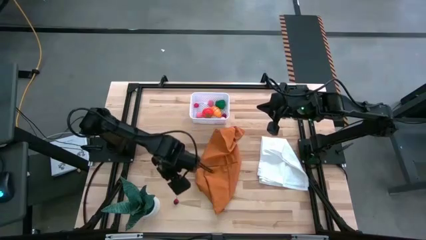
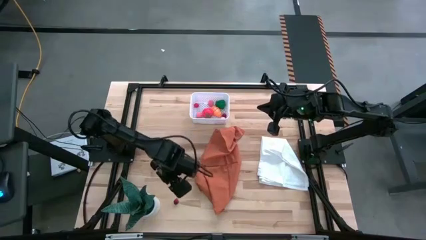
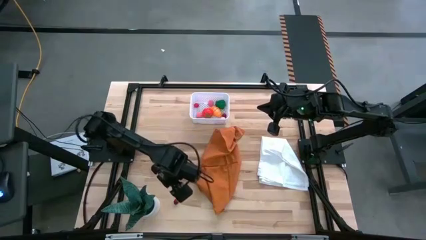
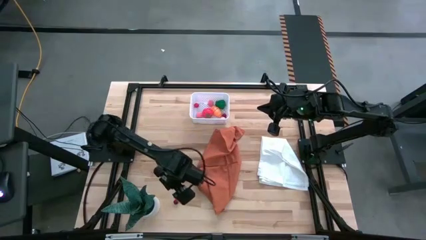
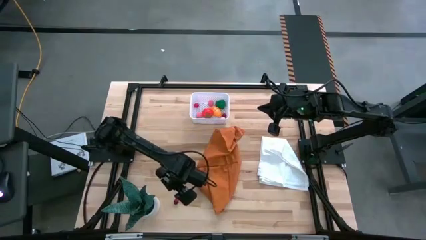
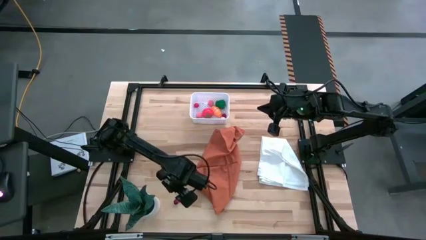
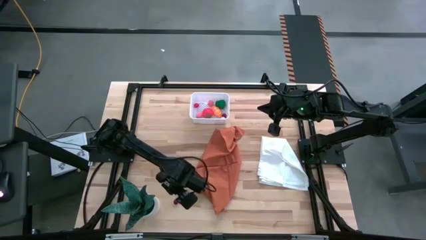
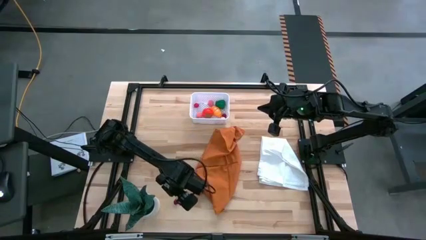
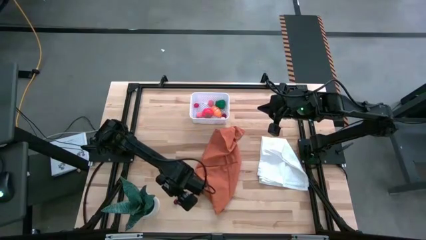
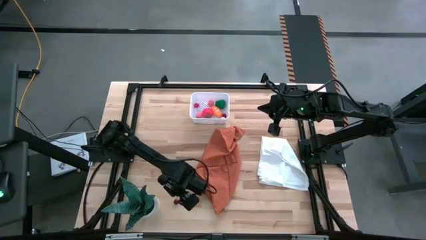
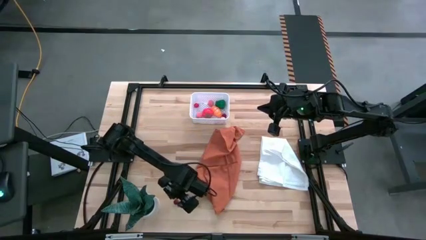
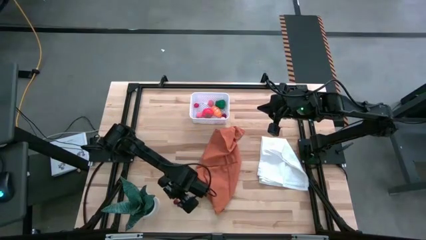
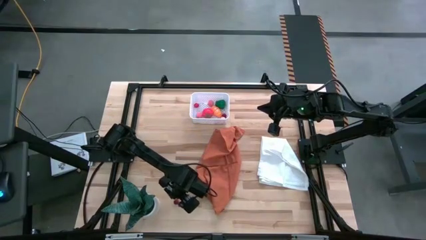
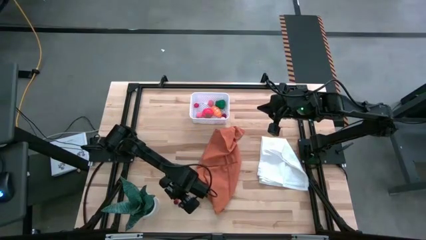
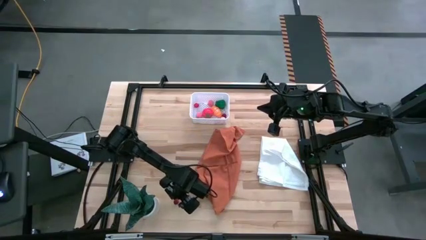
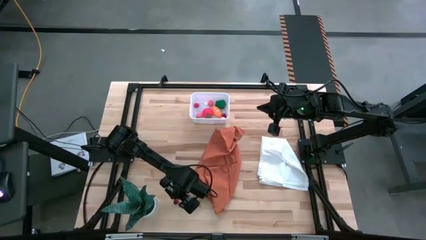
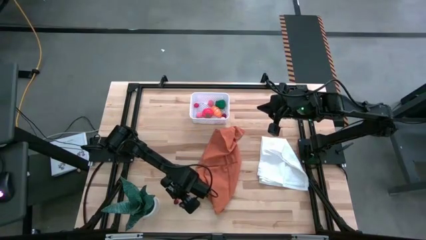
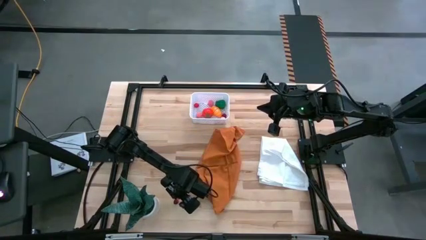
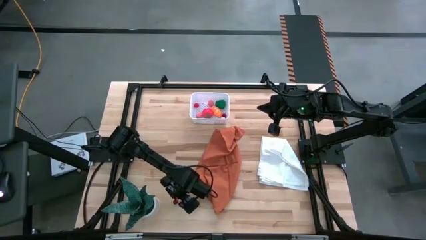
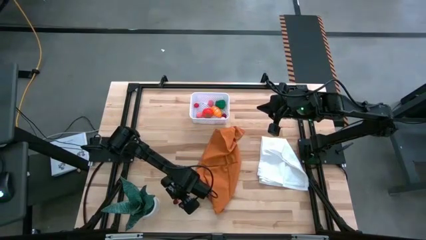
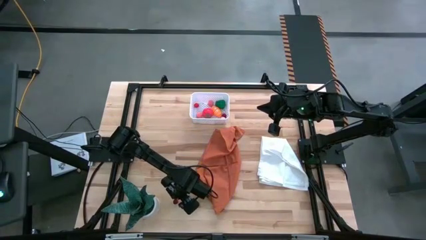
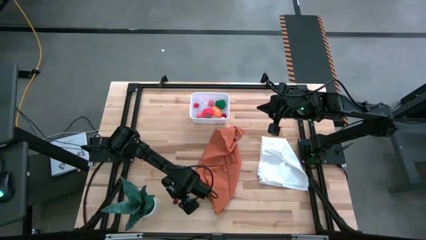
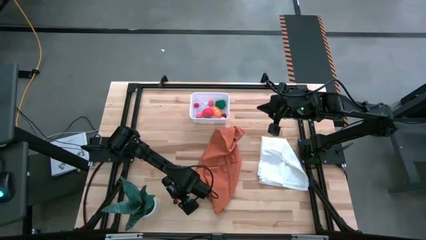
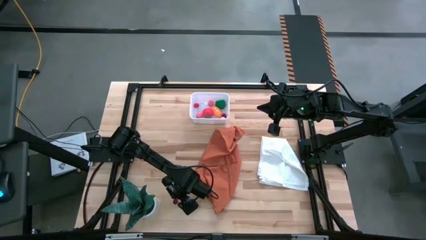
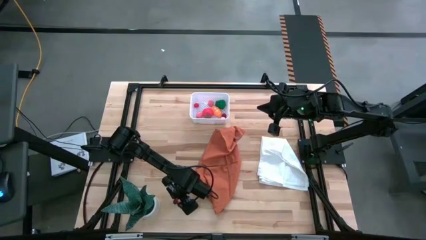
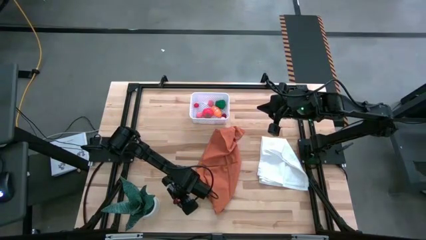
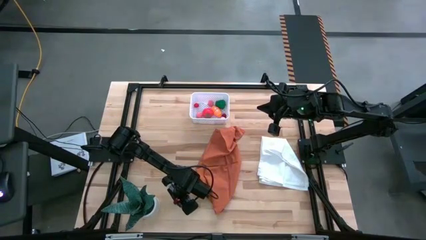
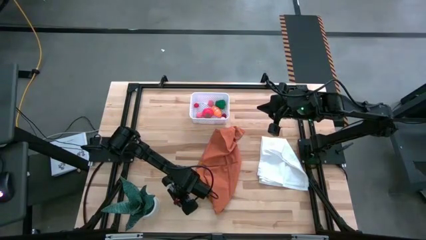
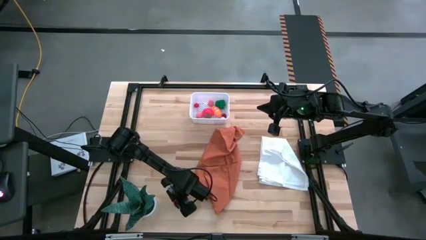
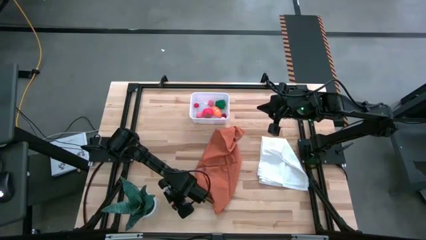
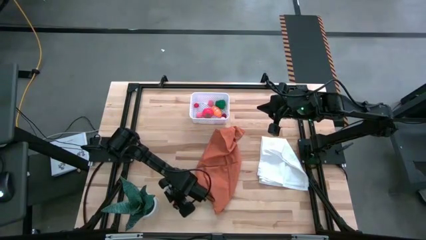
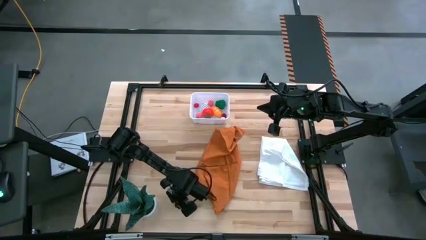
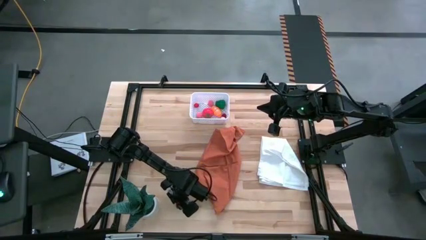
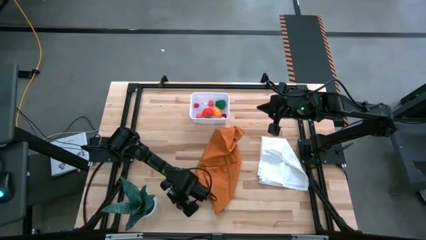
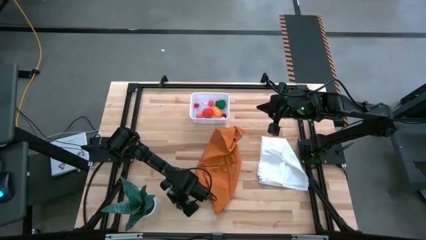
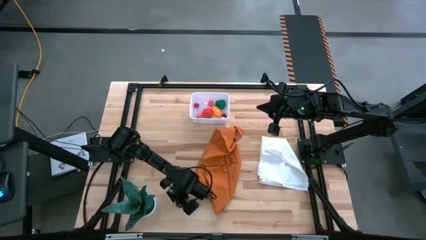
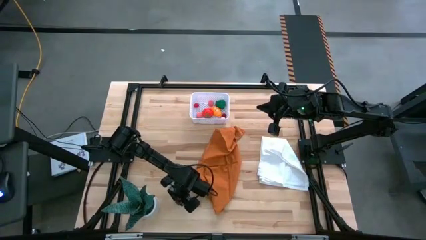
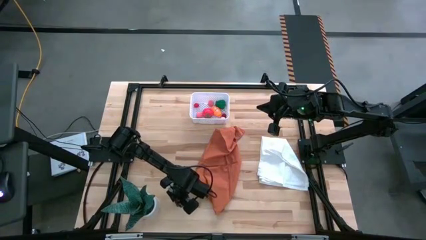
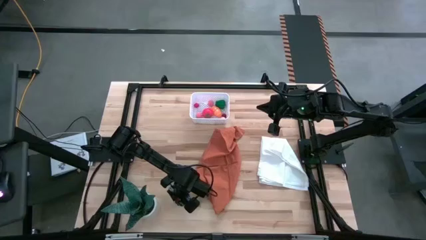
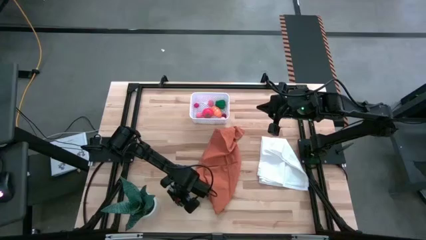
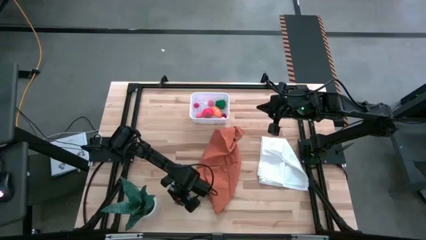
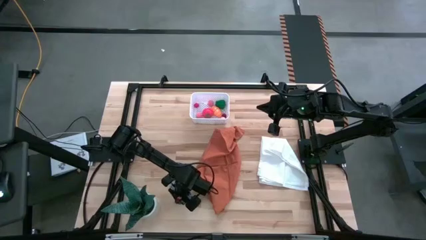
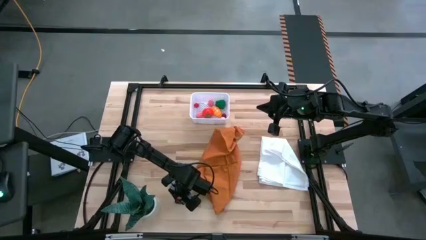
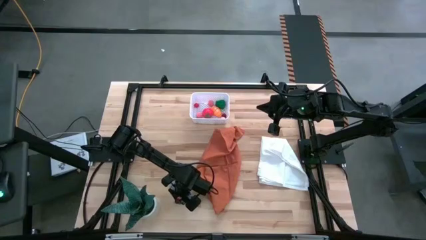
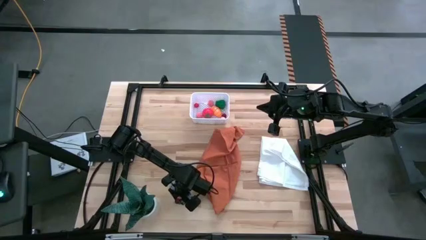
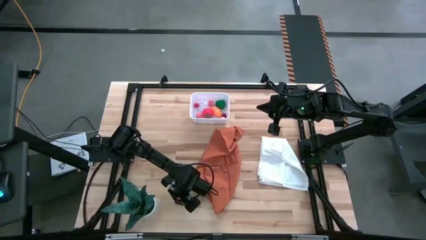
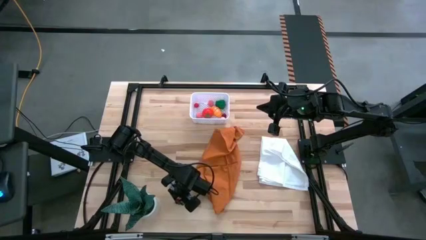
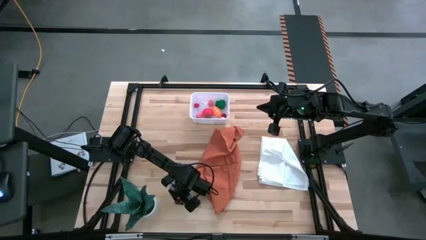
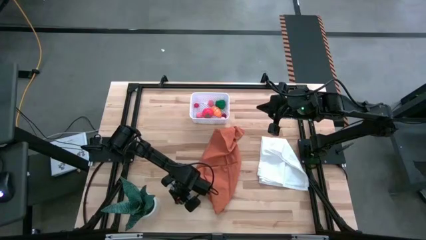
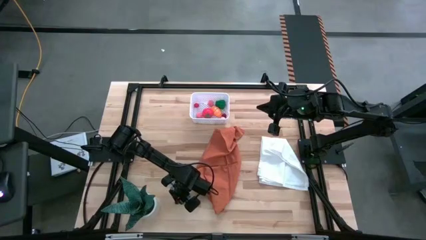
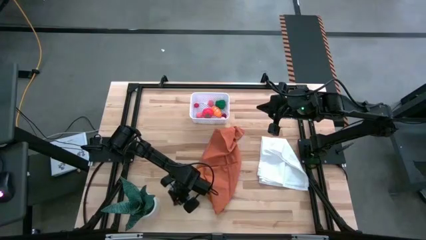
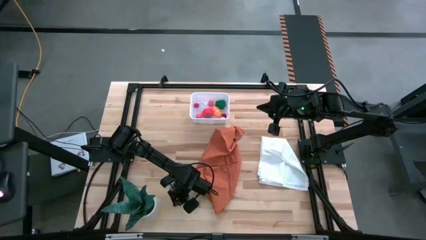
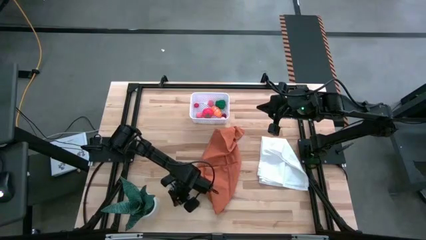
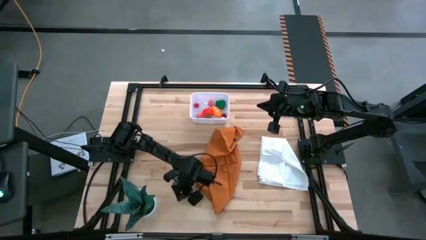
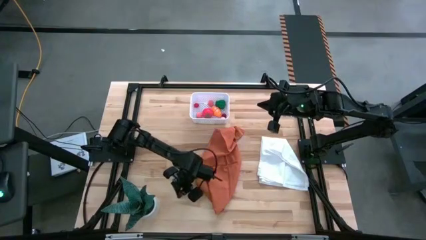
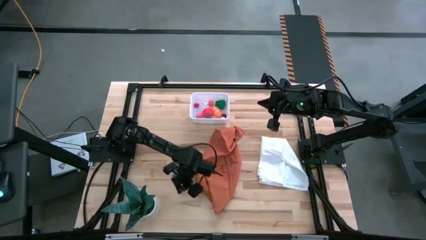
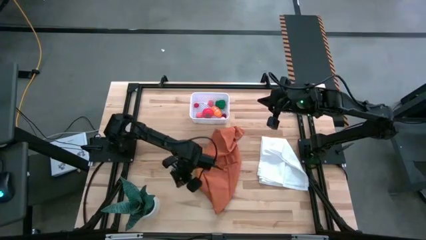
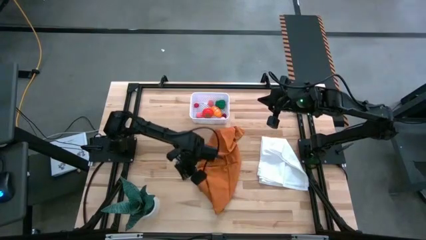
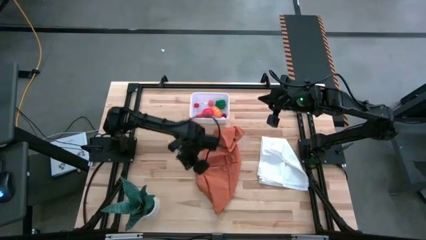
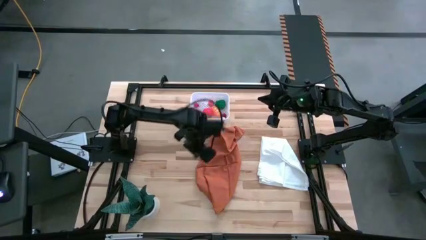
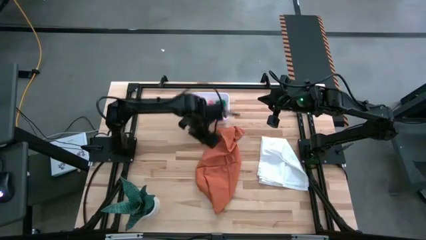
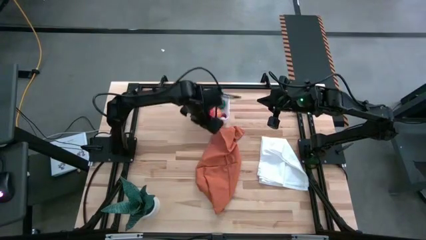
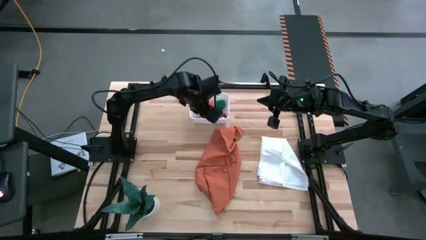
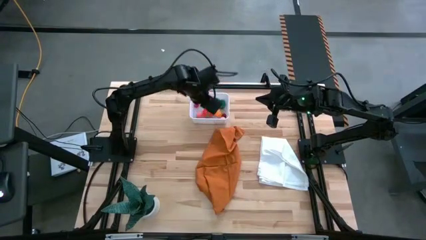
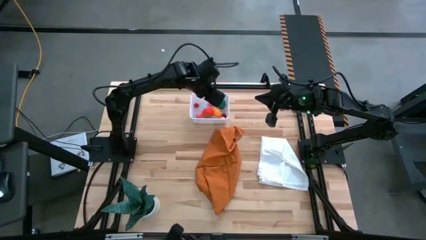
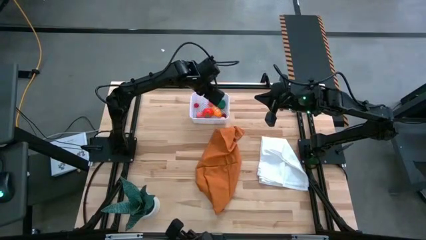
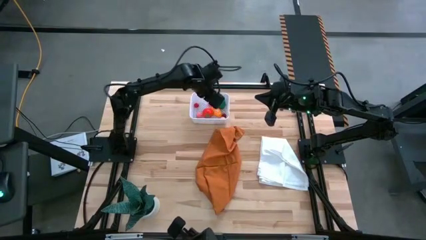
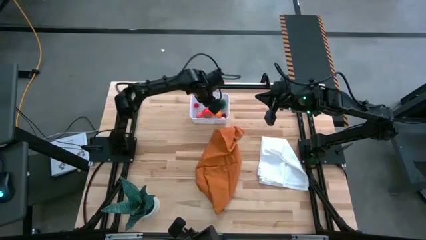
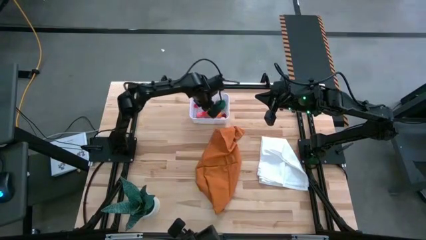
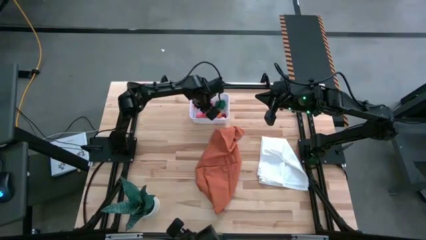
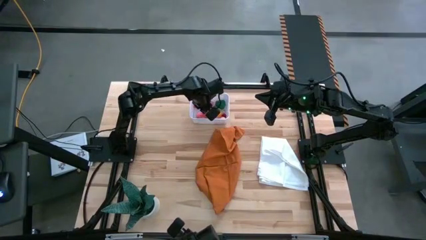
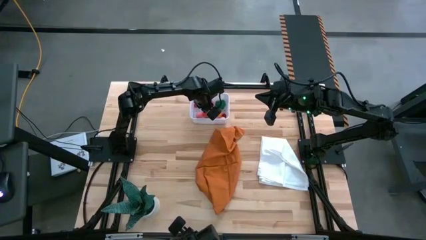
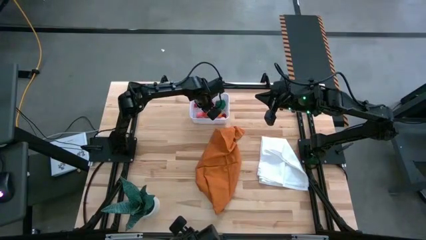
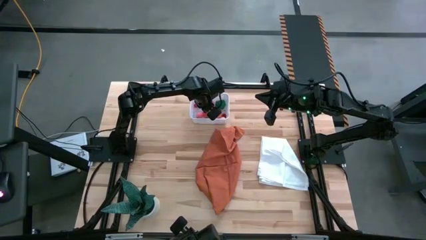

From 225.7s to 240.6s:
Task: Pick and placing Produce into tupperware
Put the red cherry into the white basket
